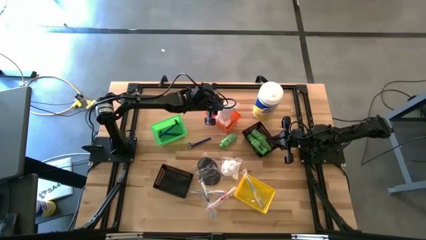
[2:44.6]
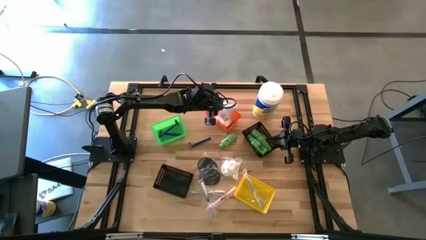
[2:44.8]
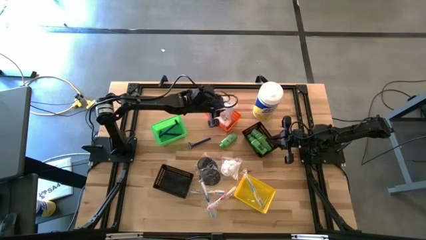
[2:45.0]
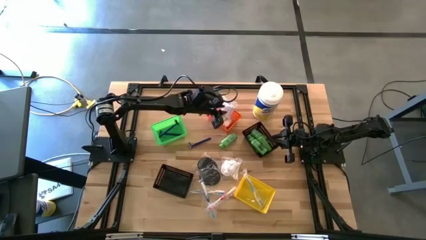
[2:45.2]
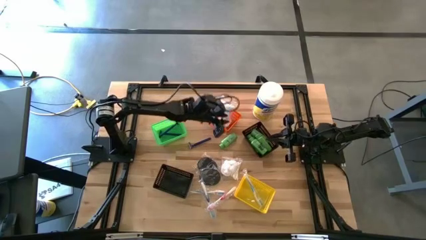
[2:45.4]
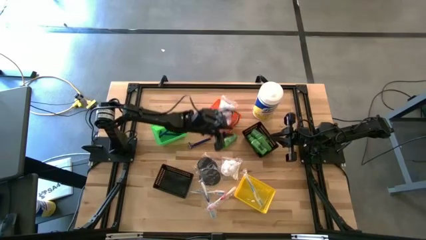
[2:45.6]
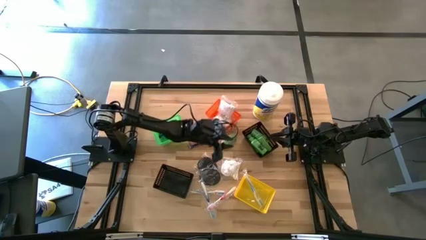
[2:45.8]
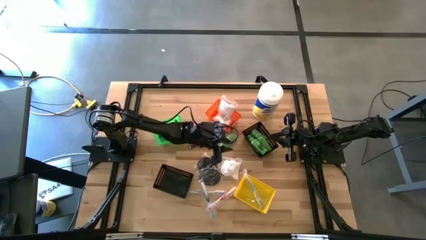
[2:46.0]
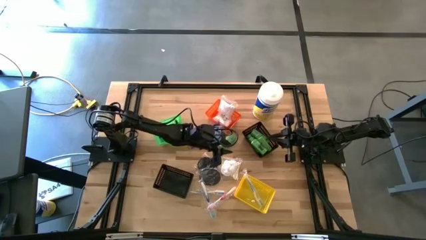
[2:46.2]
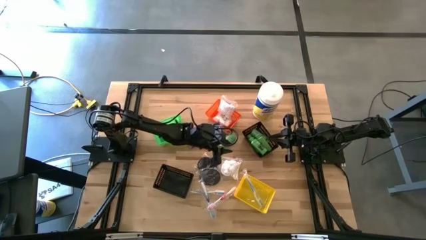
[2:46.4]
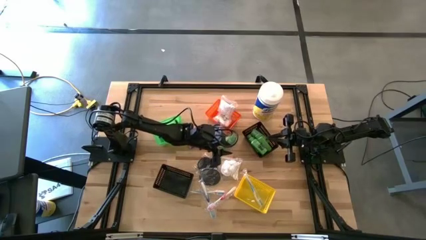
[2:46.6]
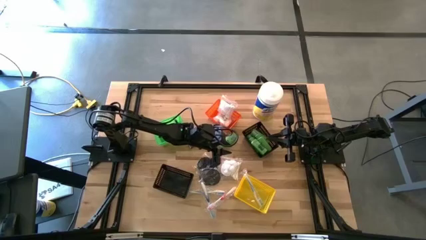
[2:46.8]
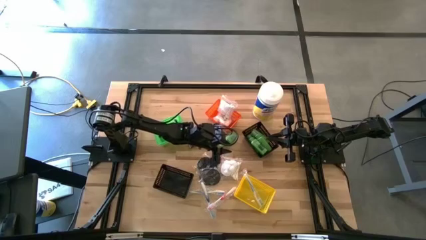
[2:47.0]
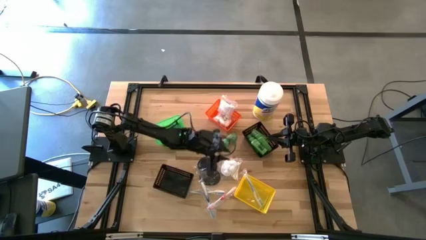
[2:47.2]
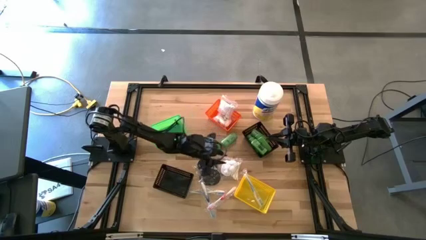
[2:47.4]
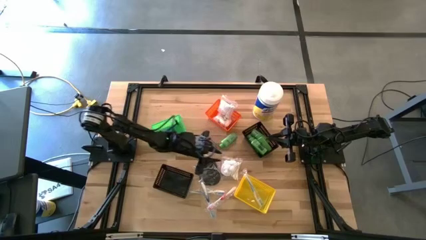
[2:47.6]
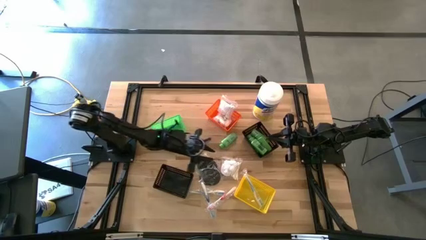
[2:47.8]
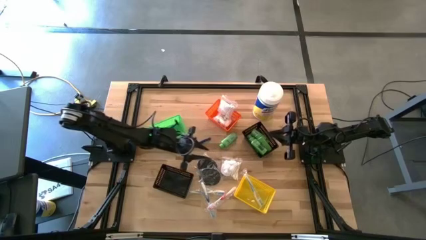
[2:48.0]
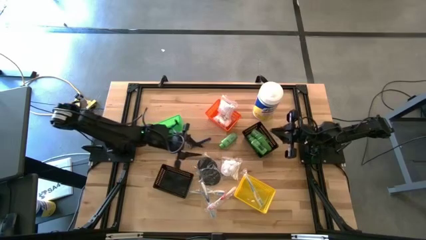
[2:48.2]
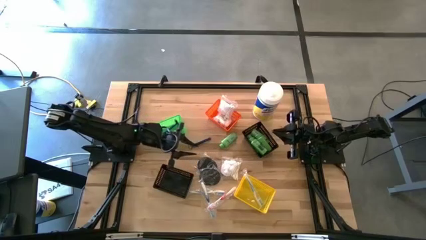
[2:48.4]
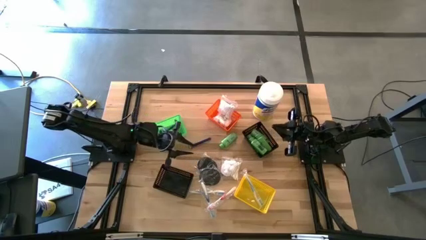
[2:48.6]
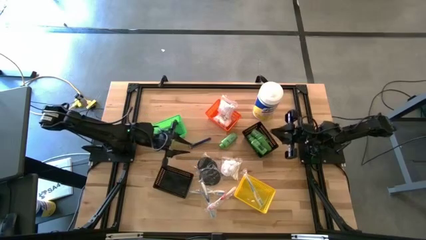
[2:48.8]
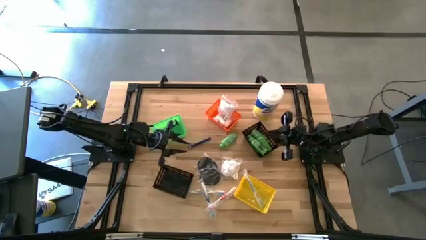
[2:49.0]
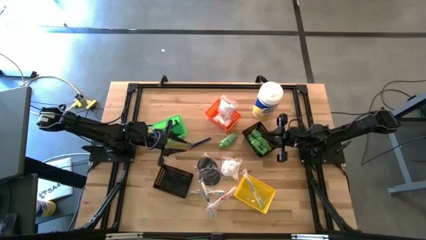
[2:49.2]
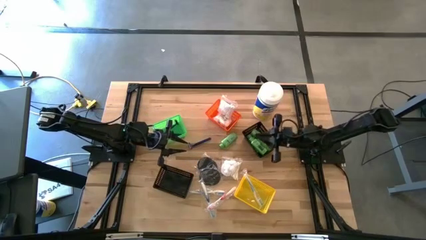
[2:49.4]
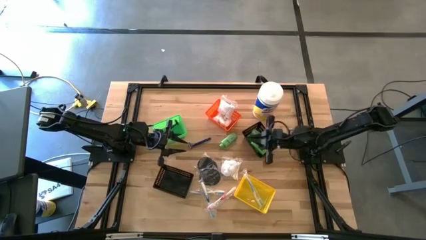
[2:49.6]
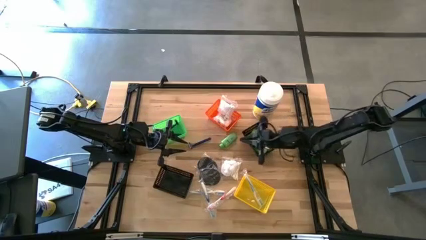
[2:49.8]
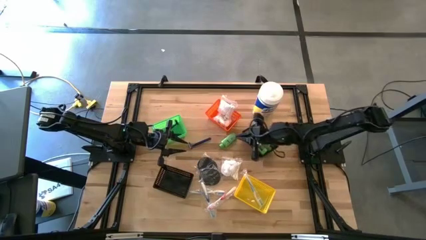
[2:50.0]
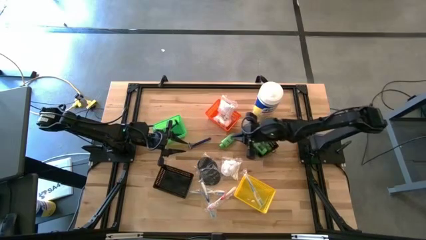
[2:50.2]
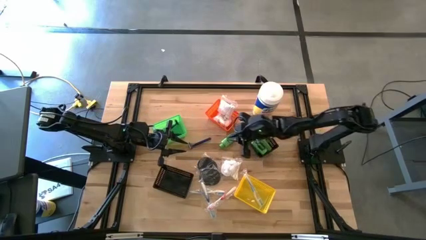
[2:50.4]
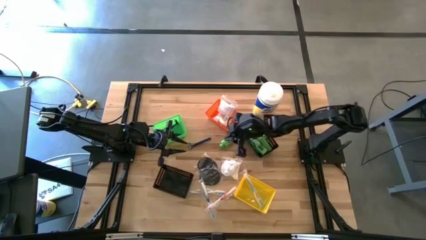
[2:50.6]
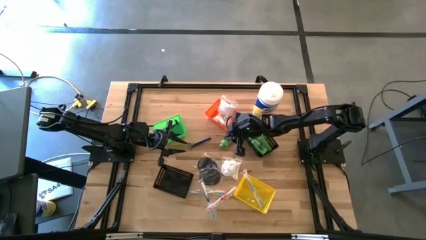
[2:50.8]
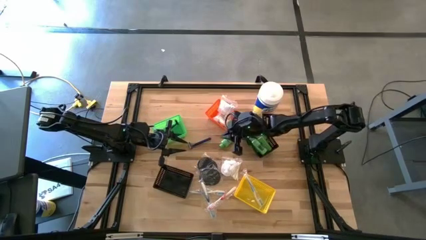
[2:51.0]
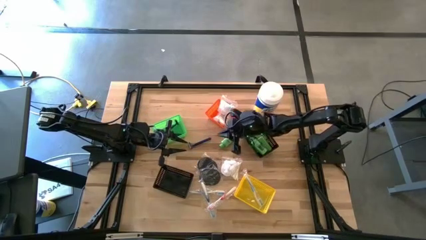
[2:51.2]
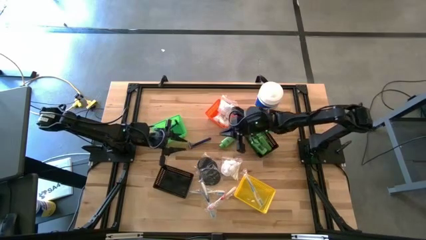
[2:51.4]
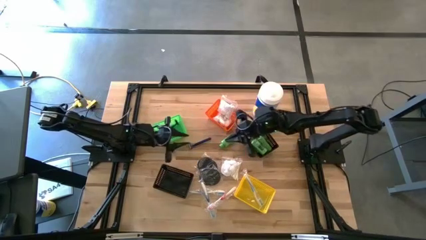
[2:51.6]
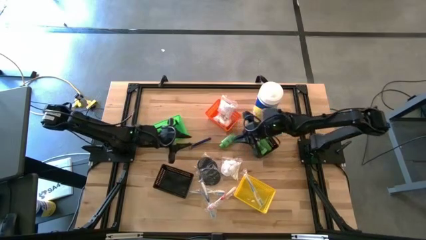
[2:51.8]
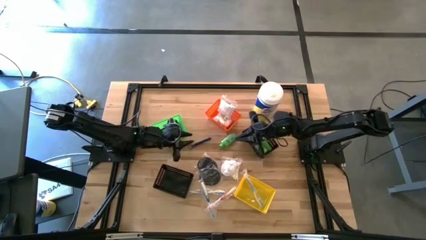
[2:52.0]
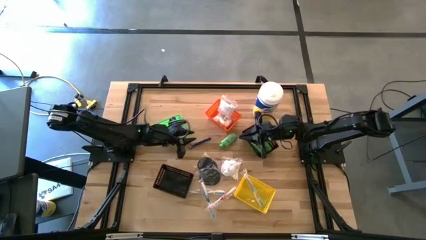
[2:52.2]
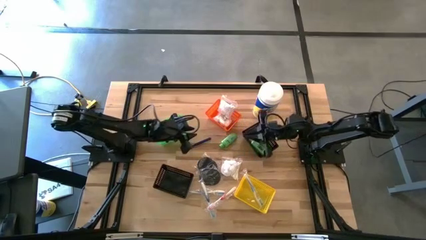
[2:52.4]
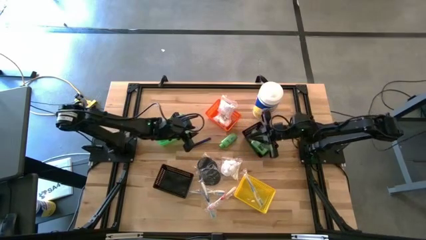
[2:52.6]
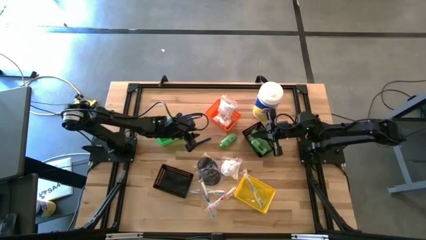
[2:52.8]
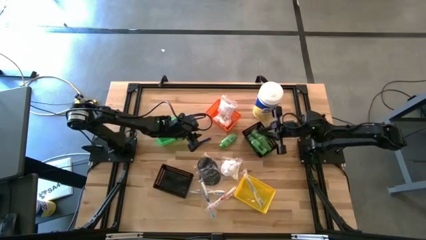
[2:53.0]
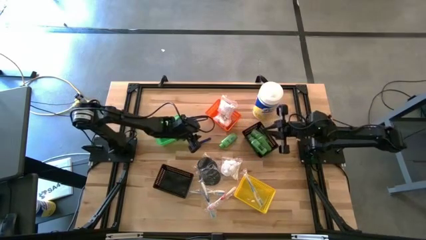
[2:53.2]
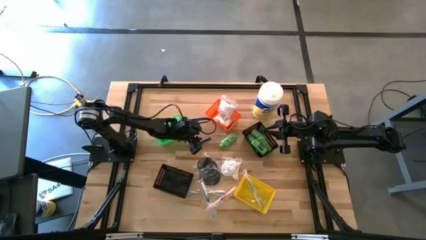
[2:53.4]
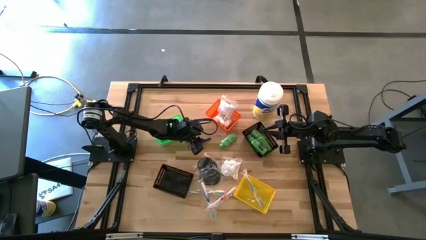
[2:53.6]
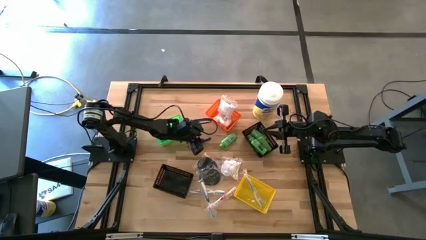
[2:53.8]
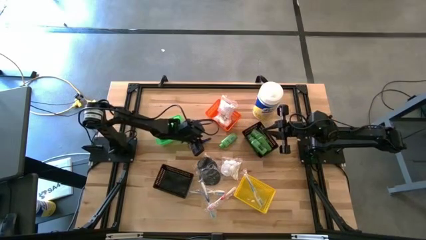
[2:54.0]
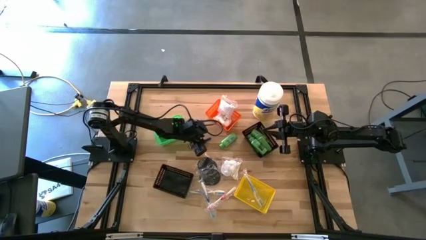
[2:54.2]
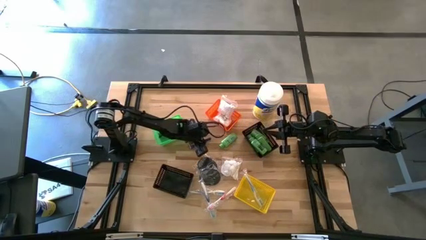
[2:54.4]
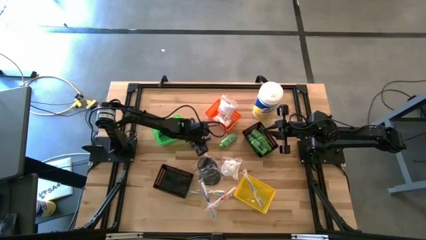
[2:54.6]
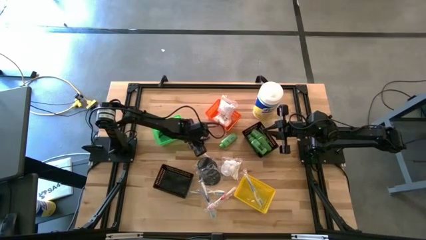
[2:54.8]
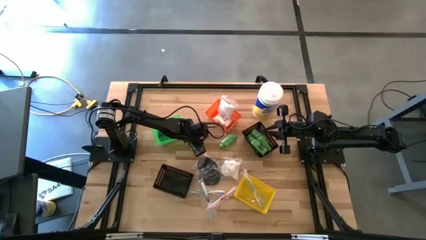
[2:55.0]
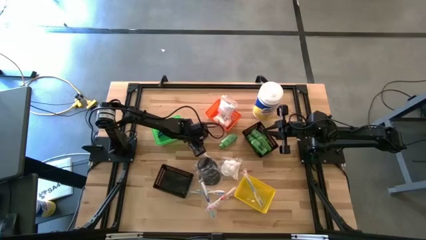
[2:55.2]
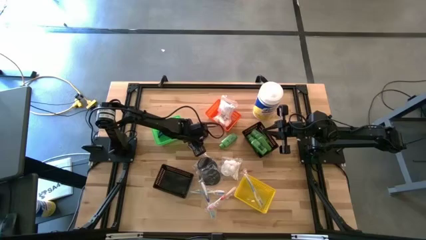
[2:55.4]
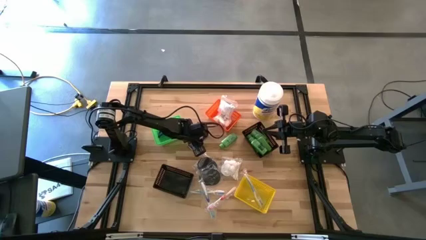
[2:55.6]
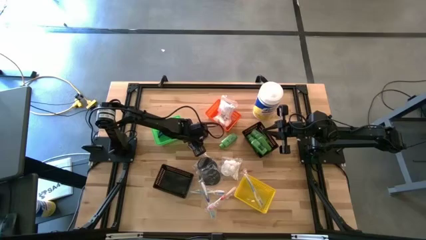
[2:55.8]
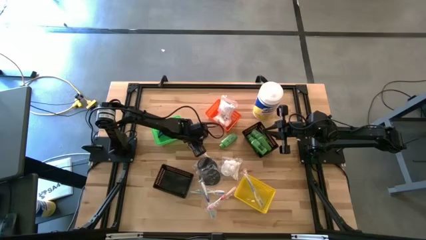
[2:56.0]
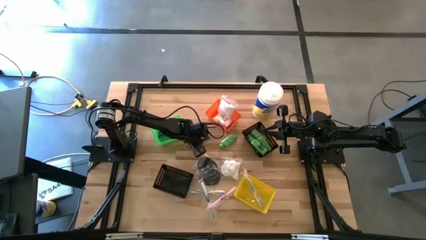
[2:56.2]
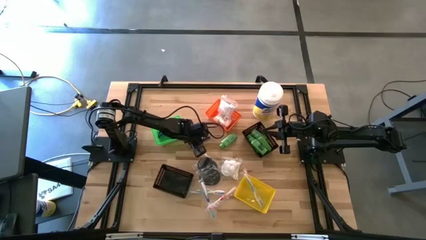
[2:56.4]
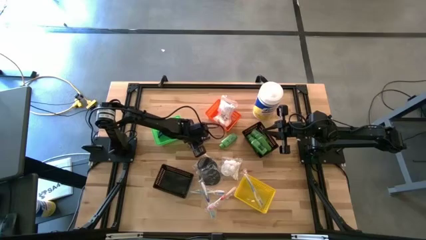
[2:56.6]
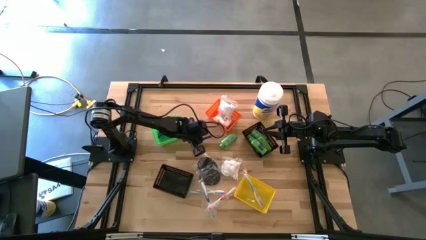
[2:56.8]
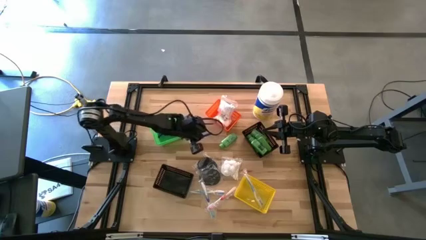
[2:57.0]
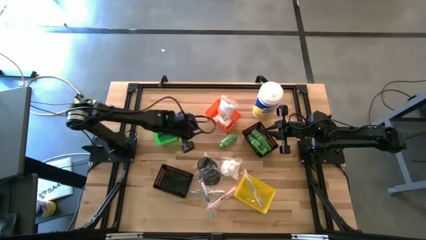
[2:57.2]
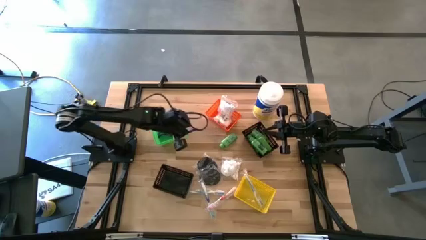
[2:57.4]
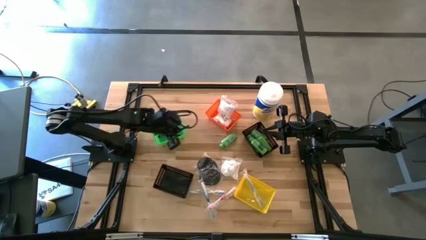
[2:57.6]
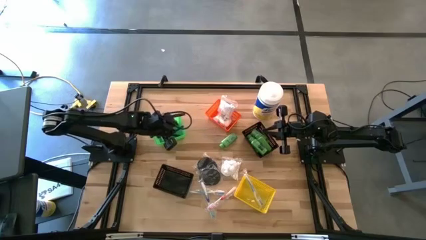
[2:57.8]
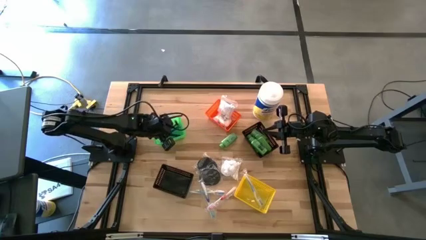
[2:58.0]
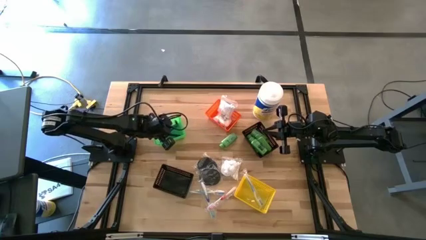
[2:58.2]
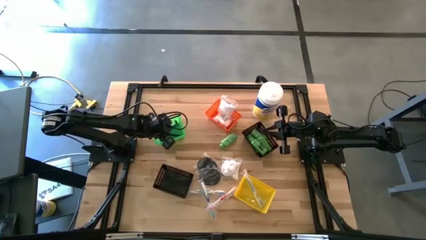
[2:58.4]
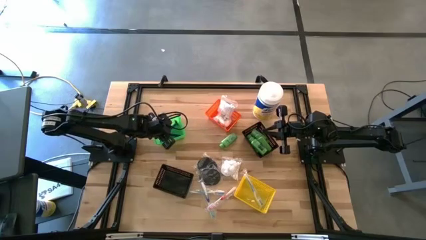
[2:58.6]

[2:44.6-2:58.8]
Task: Pick & Place Travel size toiletries
Put the blue razor into the green bin
